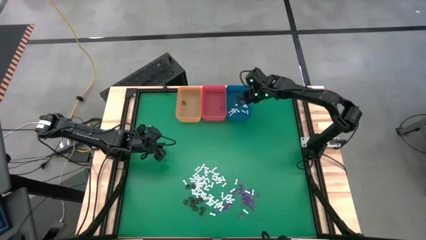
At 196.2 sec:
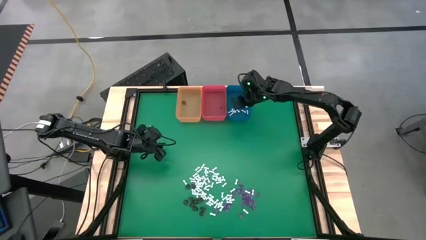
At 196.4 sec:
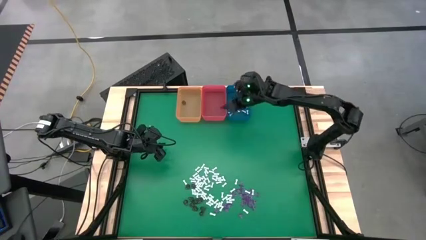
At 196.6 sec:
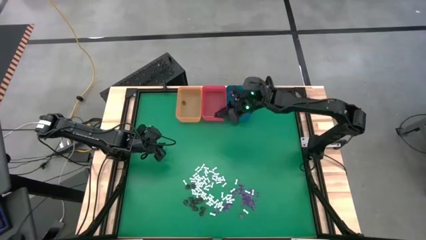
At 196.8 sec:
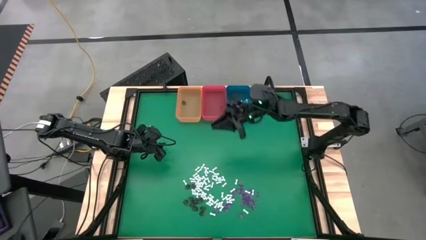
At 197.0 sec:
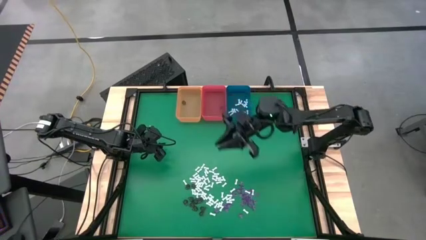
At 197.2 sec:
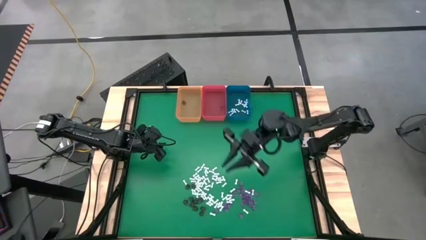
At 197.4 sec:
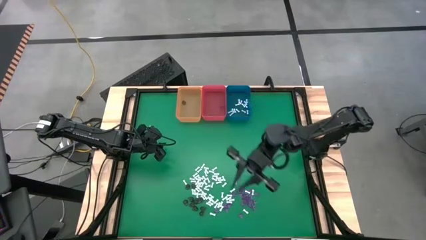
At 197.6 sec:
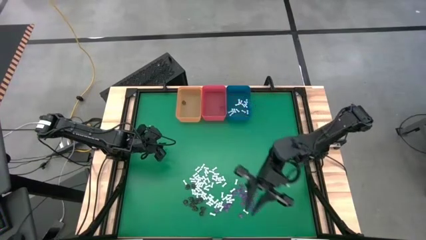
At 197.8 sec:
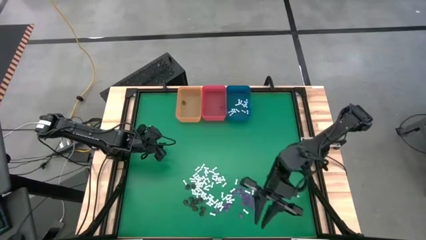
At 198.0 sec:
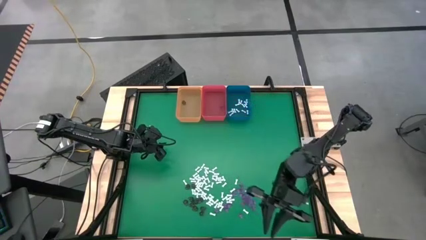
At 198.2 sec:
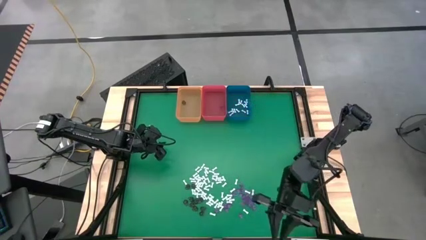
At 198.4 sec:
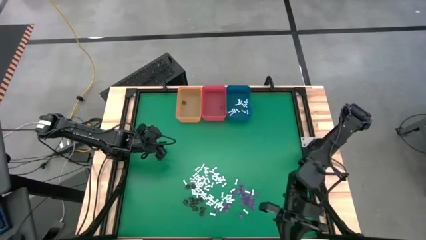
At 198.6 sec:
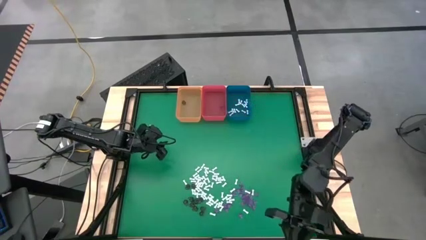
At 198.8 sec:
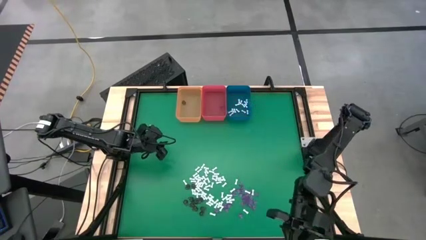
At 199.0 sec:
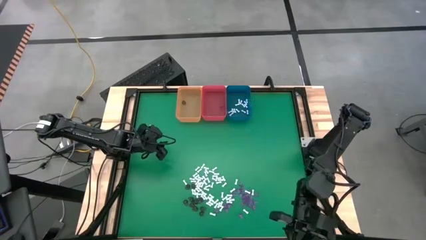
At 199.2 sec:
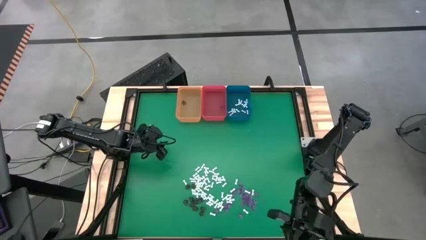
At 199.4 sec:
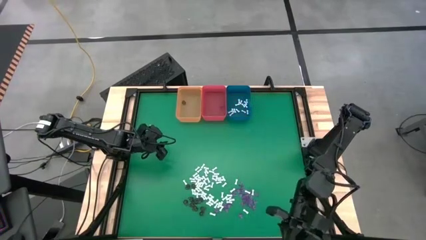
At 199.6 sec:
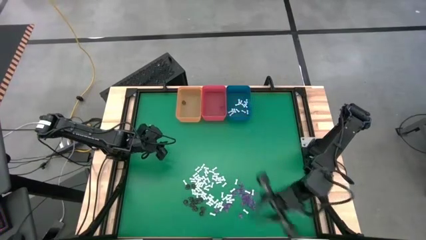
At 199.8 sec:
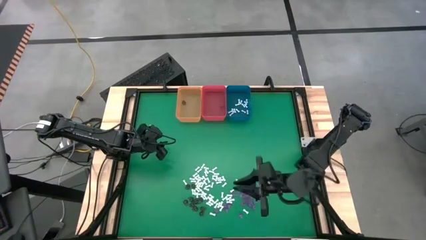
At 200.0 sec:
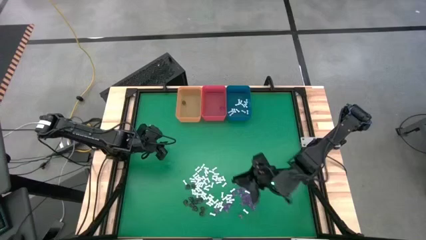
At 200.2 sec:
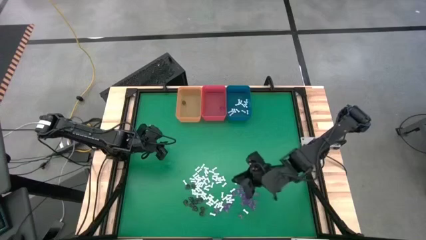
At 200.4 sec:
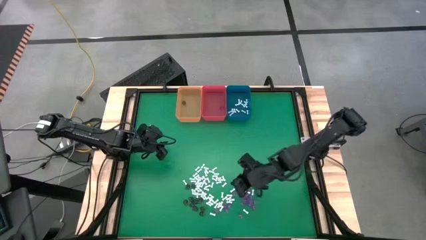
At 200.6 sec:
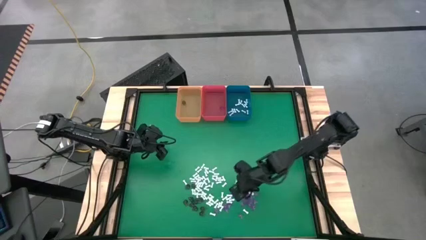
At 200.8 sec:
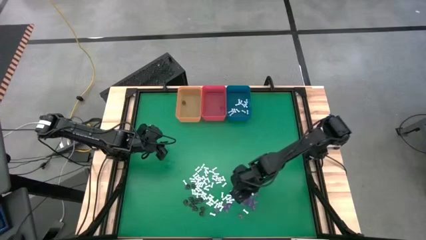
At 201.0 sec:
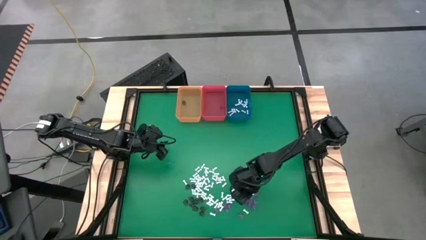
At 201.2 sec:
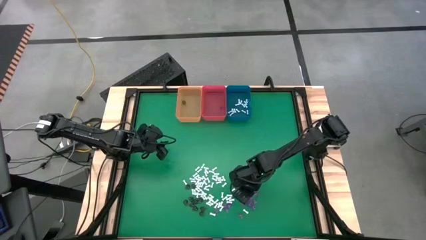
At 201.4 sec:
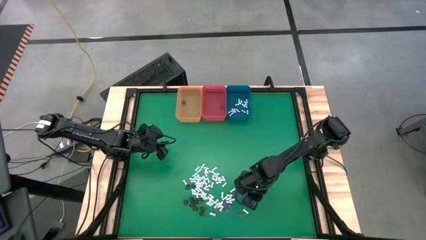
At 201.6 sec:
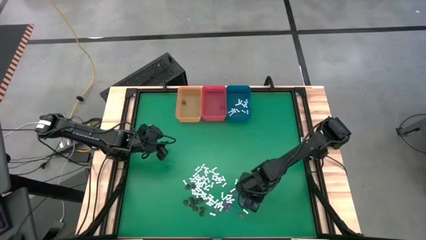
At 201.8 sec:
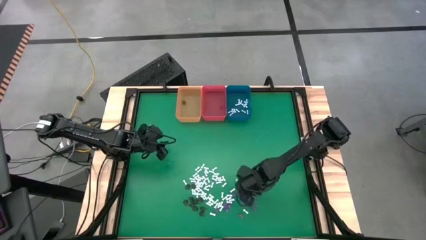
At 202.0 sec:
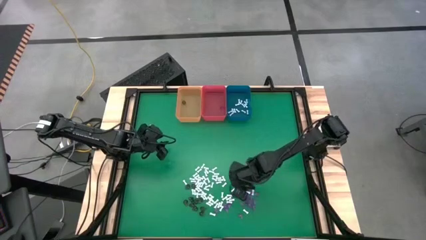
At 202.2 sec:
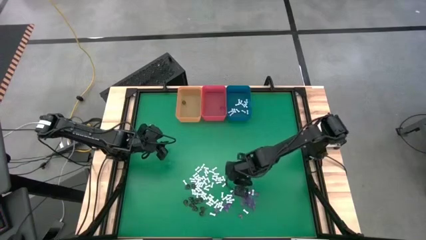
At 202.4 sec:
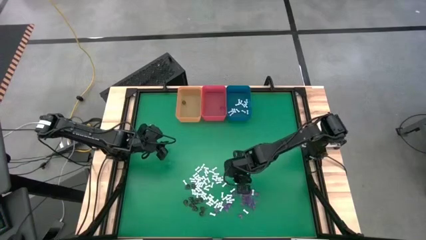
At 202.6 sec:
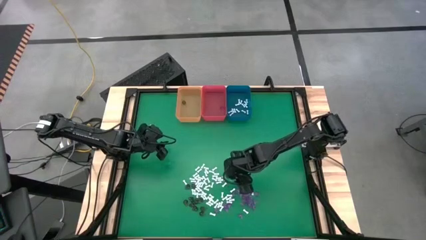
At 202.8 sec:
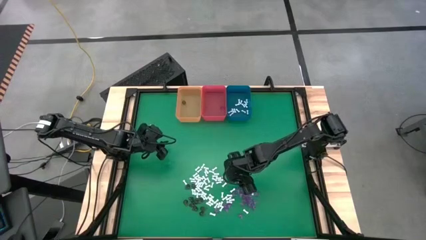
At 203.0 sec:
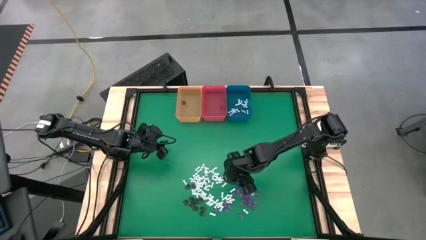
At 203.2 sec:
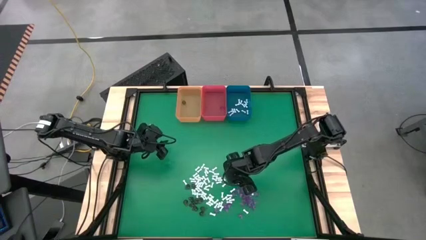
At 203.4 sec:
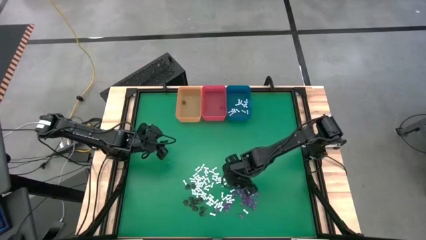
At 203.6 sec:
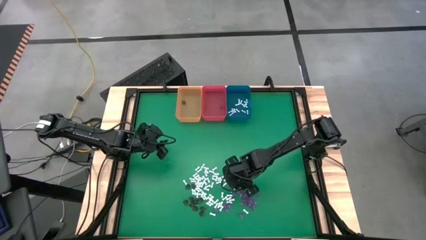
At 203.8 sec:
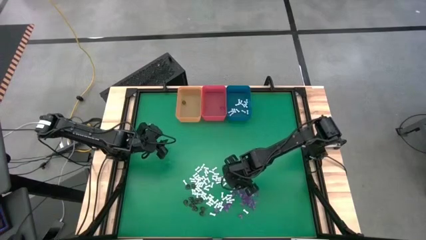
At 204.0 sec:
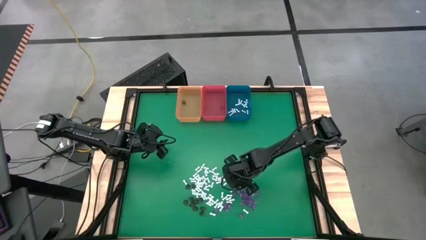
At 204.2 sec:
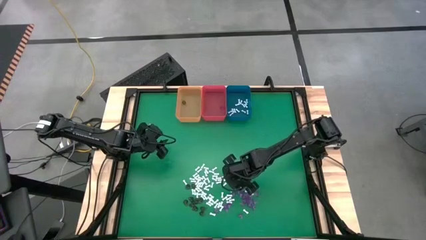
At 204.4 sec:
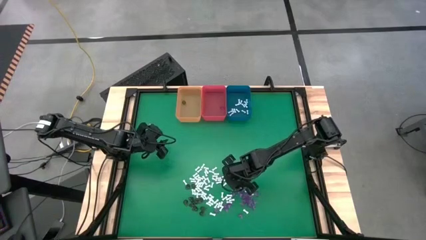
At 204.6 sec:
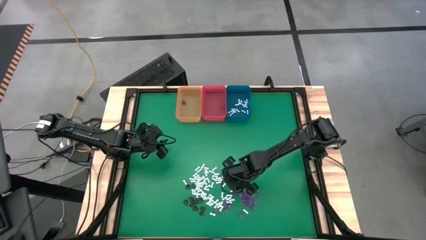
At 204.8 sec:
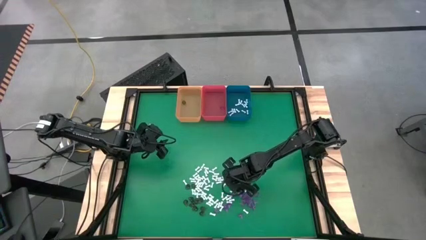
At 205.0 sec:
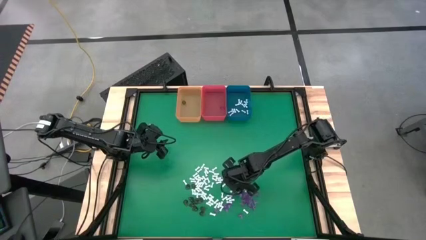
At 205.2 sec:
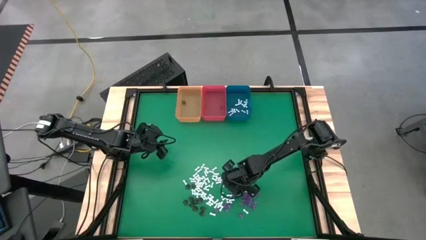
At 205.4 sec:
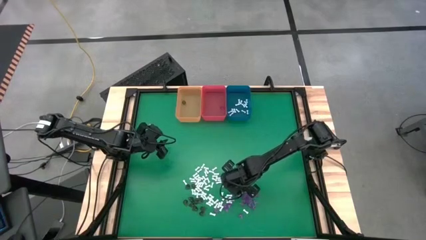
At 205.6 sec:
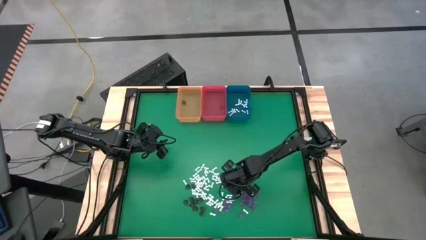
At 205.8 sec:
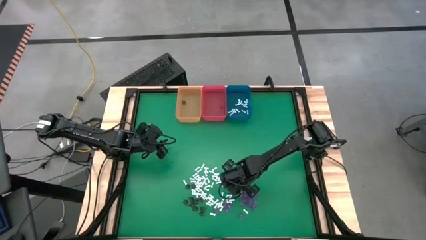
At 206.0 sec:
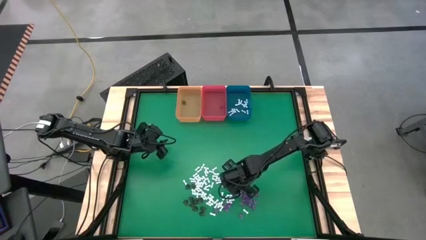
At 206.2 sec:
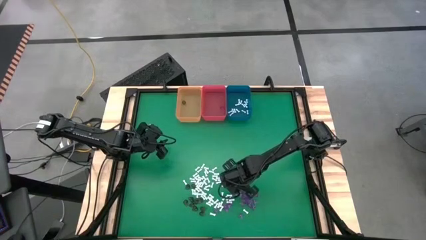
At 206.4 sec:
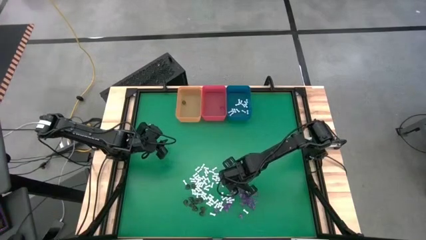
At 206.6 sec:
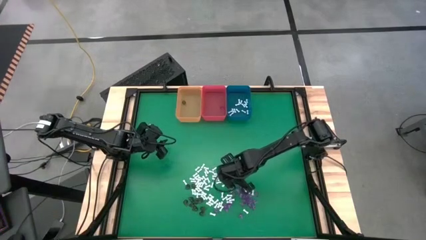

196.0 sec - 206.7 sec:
Task: Sort Halloween decoration
Put the white bone toy into the blue bin

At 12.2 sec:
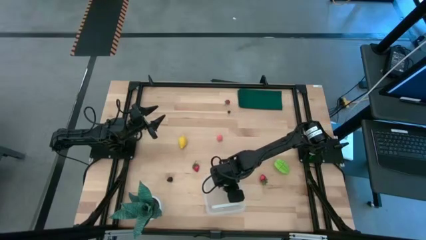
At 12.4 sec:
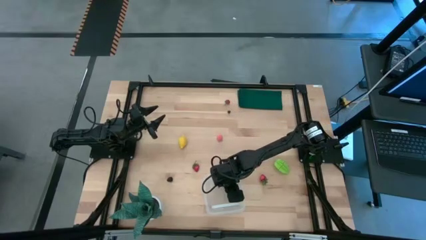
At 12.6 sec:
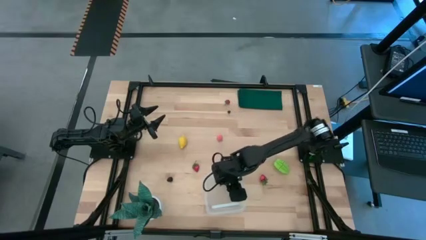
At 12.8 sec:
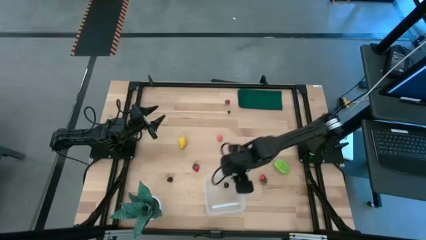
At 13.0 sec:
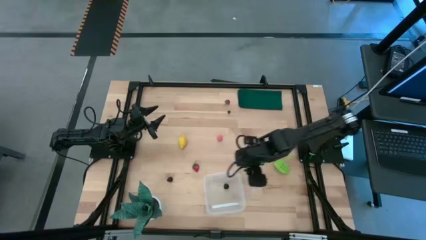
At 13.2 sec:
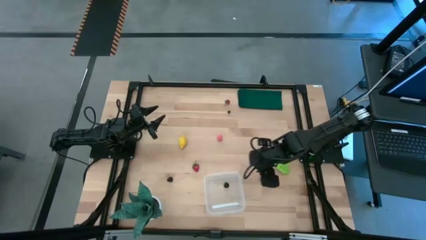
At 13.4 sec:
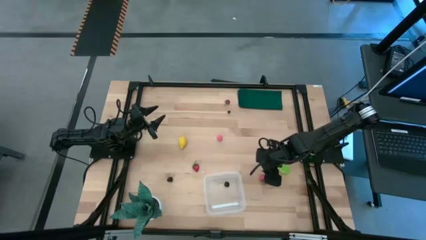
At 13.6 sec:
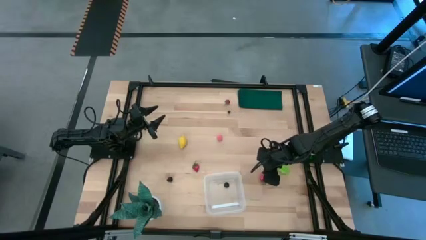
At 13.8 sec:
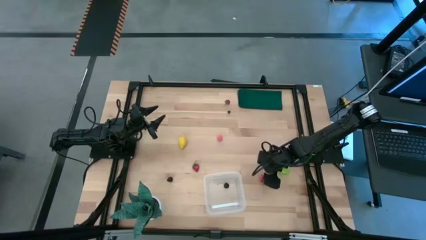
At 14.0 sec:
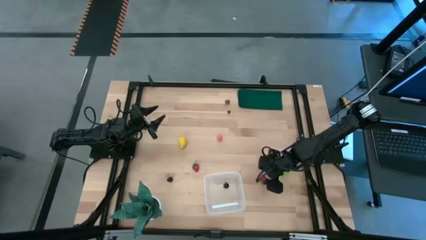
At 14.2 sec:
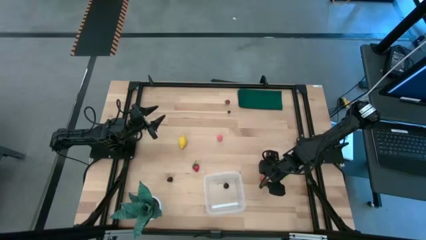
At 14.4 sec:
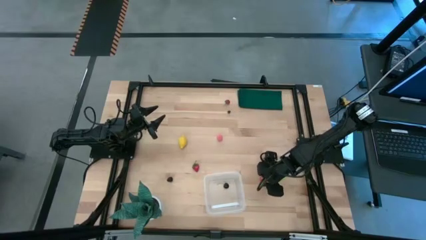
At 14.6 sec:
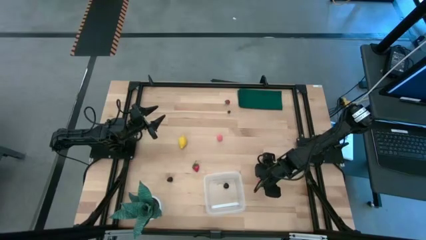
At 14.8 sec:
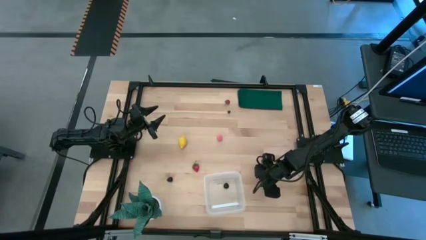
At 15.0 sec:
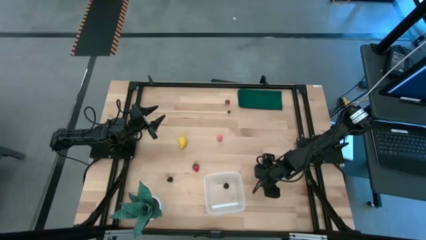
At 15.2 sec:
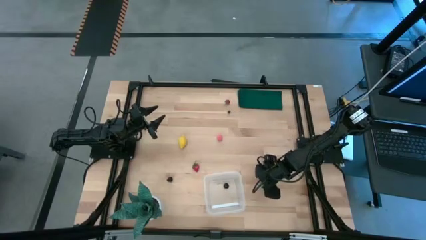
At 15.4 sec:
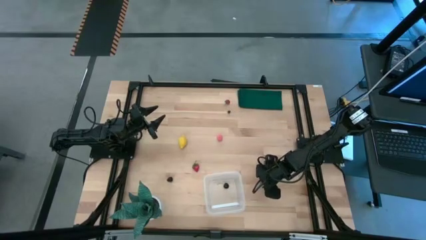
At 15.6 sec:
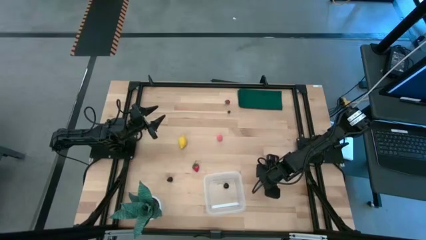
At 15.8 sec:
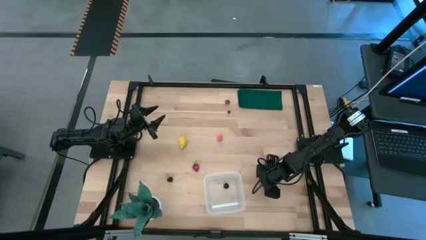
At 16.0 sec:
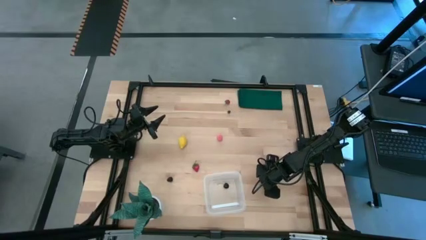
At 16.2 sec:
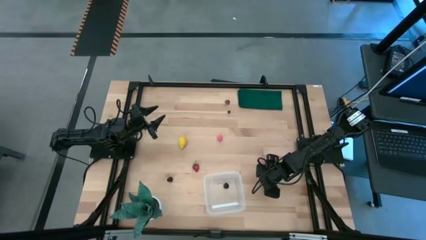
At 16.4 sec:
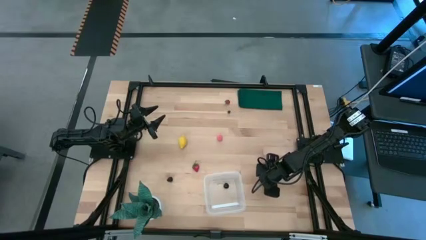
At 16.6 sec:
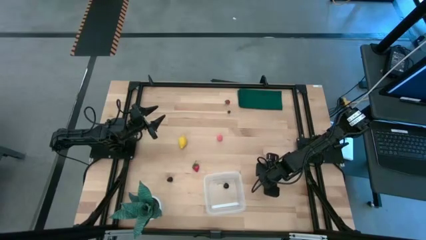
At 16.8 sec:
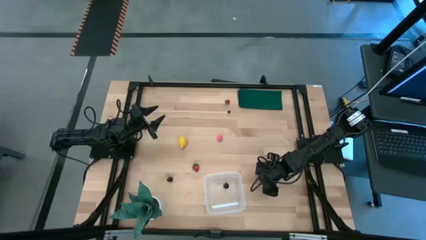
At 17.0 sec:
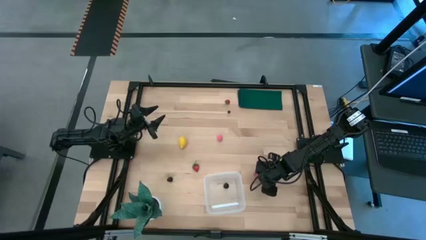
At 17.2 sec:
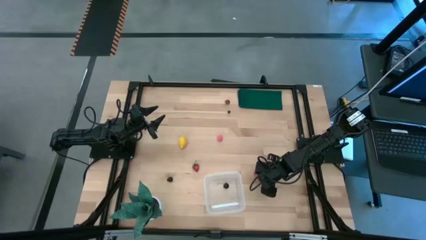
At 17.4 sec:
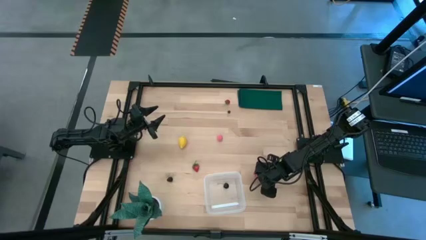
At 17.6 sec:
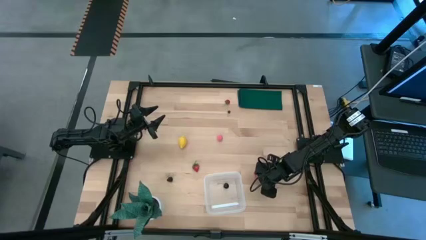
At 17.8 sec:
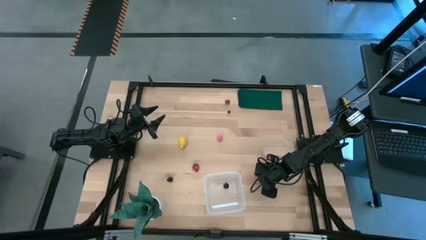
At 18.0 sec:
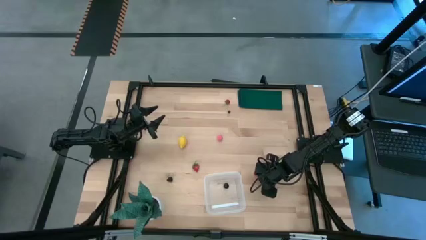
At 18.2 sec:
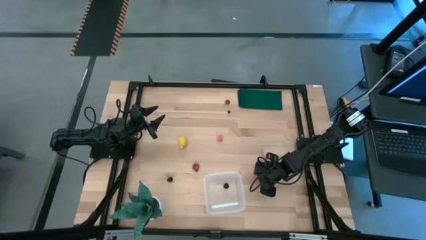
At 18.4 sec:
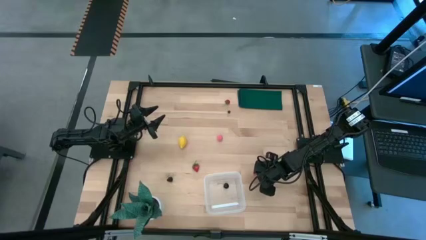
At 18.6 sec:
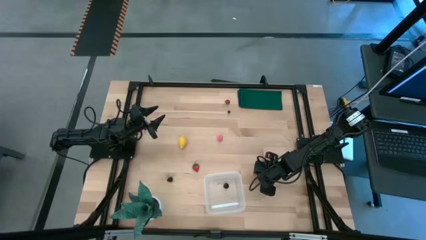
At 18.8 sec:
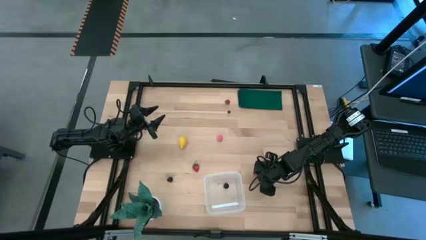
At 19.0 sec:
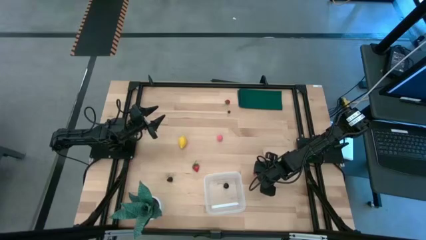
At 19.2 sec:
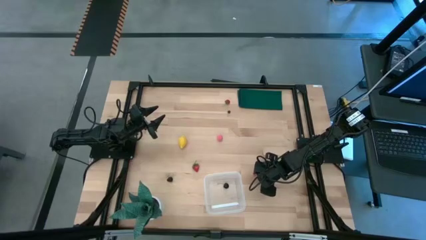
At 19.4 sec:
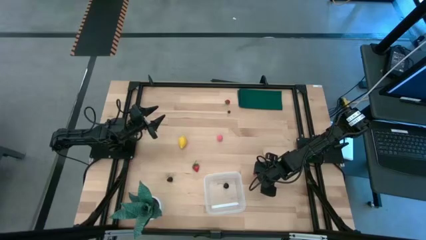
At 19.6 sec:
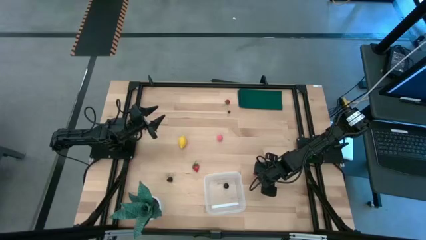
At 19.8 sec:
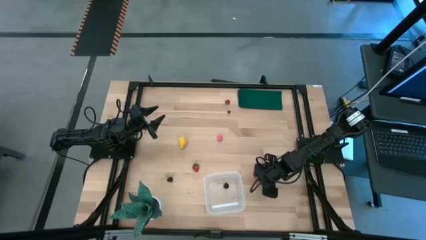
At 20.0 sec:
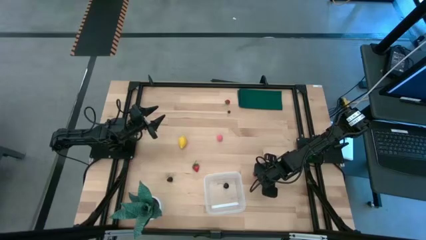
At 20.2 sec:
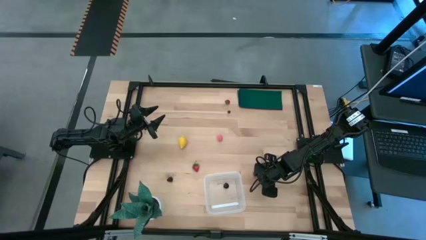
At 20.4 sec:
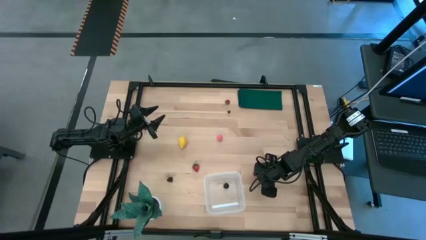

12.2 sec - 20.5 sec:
Task: Pick and placing Produce into tupperware
Put the bottom right red strawberry into the transparent bin
